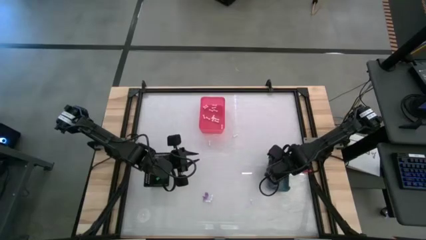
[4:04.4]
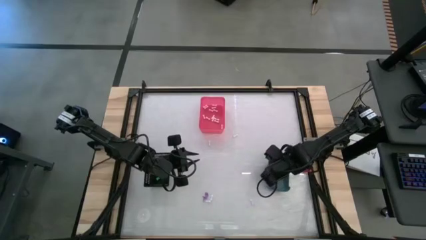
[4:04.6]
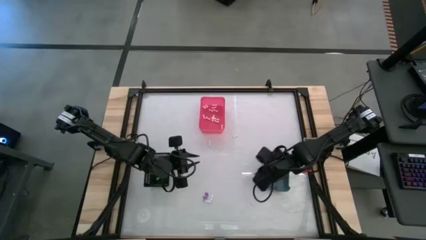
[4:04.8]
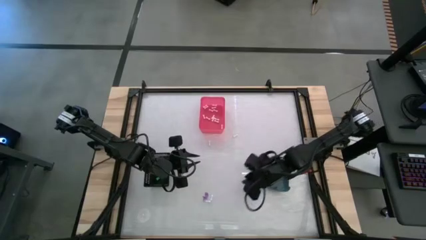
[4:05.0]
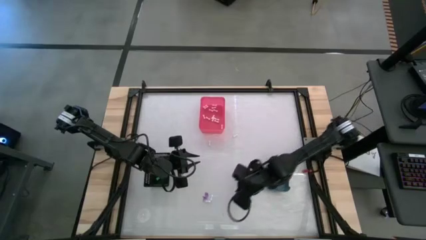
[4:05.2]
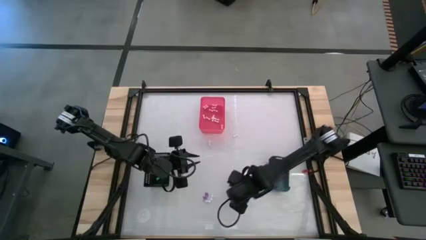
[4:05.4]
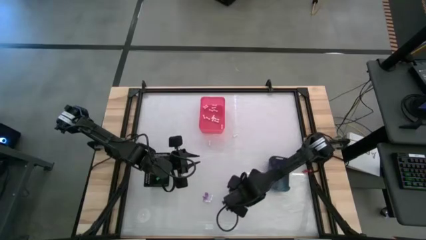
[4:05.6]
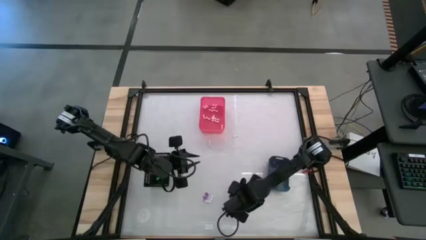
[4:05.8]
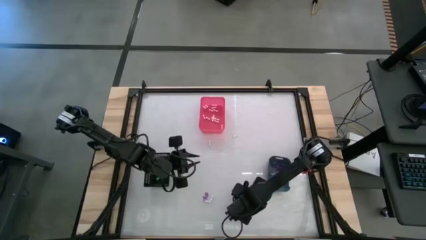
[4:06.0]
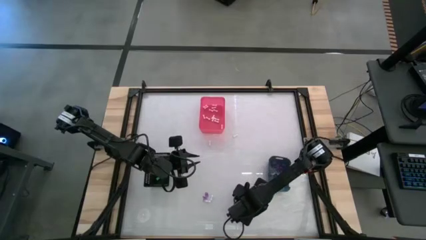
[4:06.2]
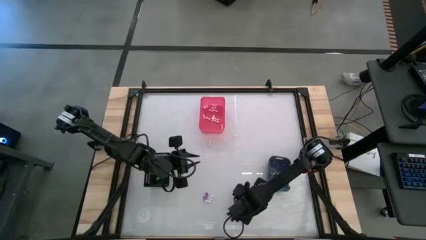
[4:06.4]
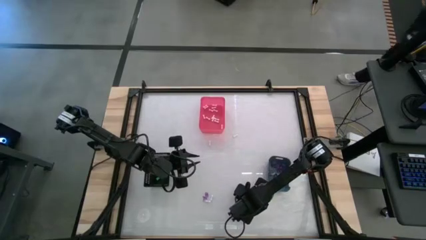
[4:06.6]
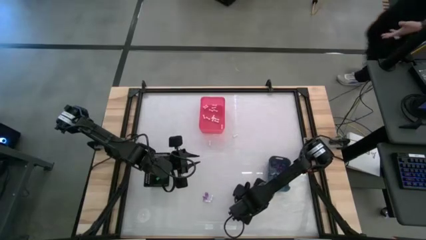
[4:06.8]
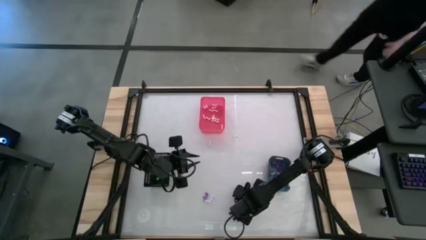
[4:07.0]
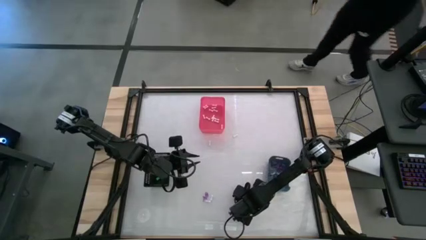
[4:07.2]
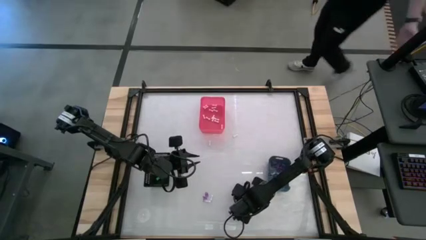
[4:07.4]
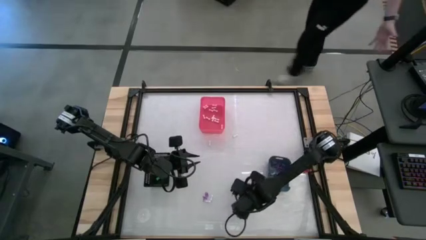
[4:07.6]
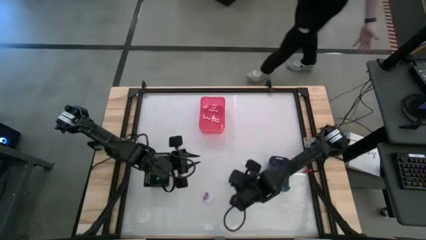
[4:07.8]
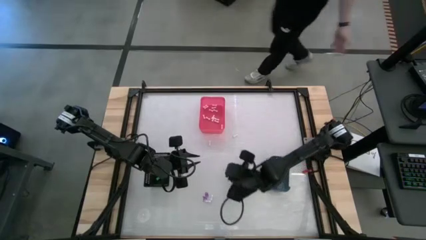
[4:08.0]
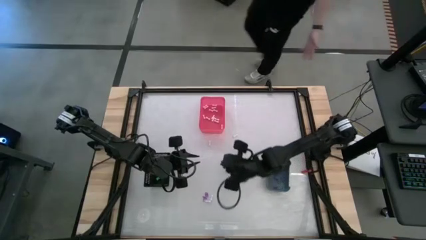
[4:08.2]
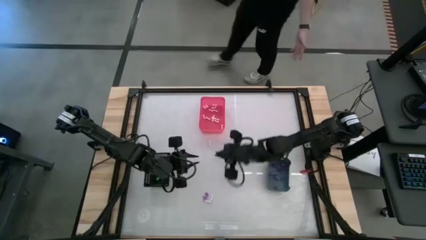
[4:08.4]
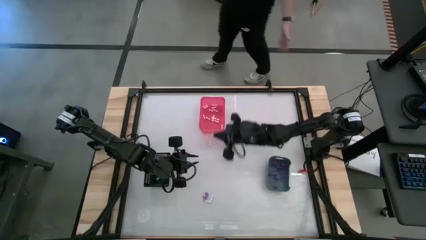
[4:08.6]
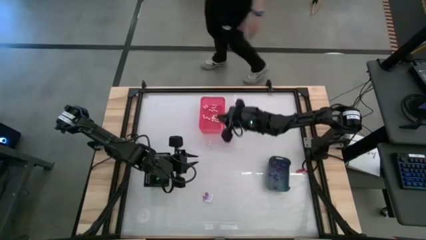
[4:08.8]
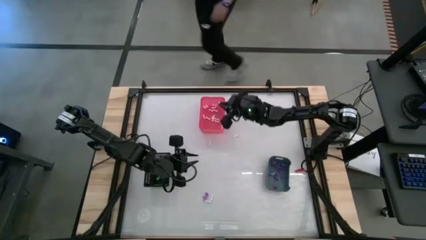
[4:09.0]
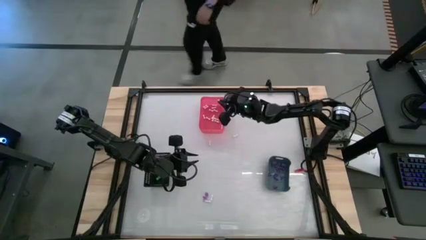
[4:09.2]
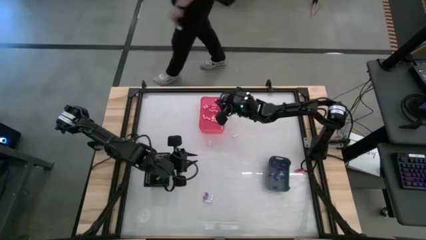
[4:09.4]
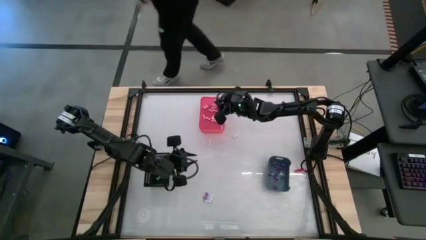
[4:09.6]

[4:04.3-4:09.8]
Task: Sort Halloween decoration
Put the bone toy into the red bin

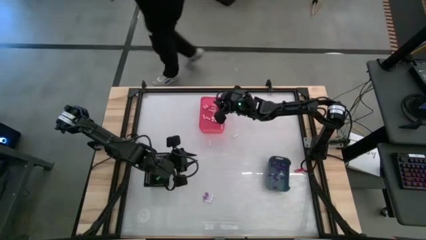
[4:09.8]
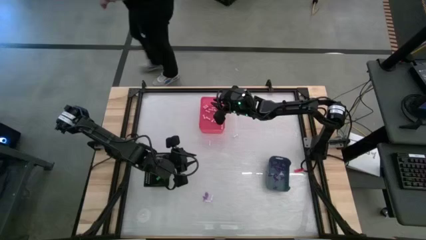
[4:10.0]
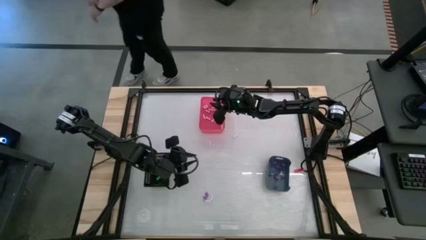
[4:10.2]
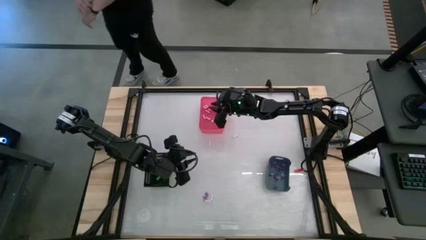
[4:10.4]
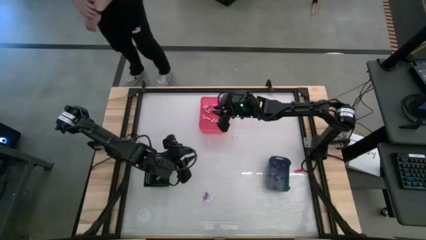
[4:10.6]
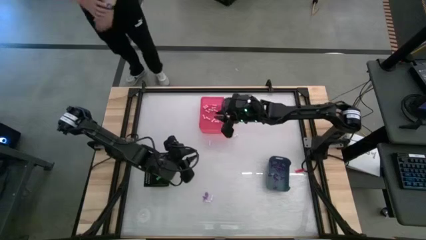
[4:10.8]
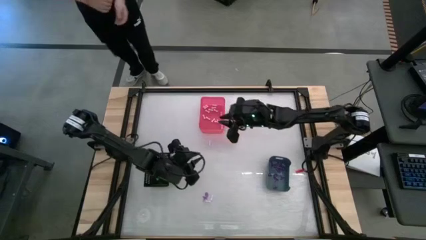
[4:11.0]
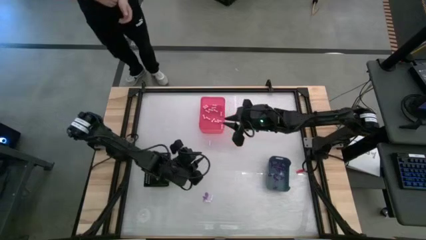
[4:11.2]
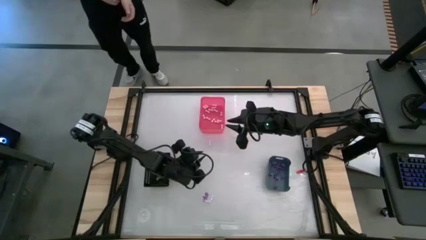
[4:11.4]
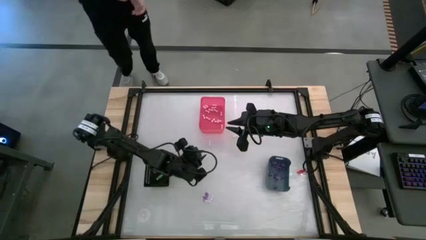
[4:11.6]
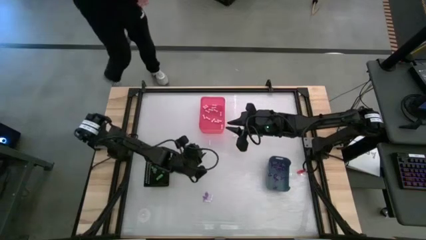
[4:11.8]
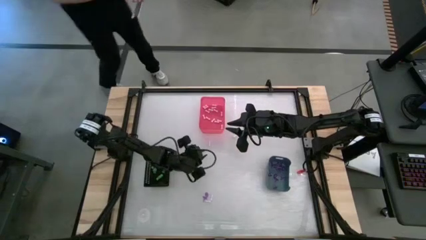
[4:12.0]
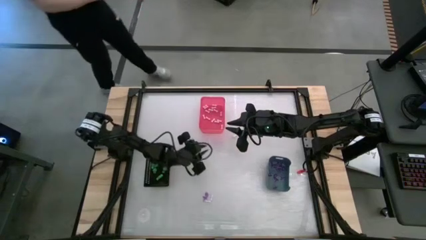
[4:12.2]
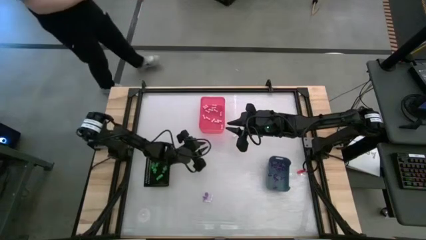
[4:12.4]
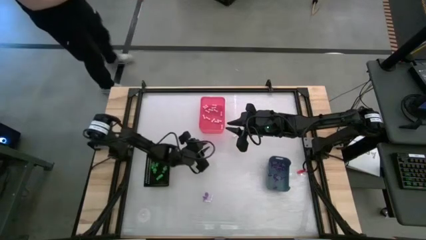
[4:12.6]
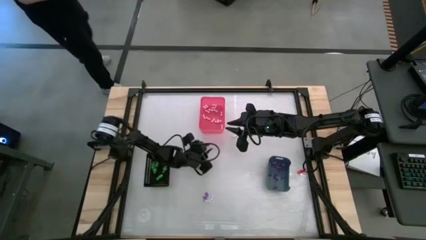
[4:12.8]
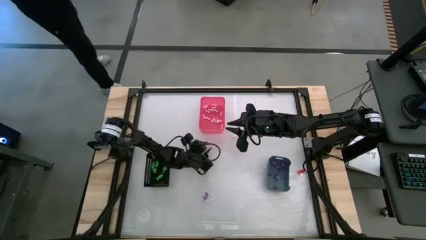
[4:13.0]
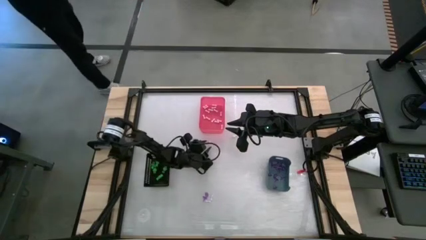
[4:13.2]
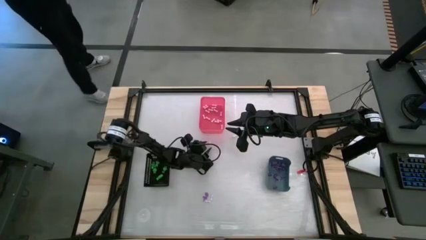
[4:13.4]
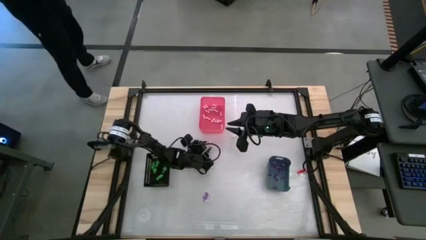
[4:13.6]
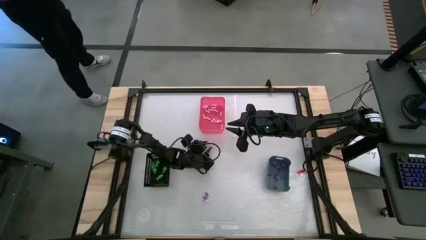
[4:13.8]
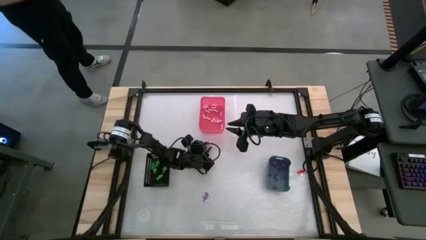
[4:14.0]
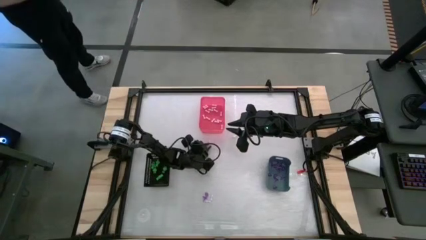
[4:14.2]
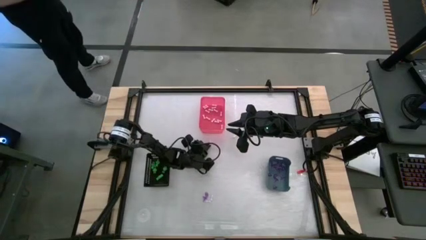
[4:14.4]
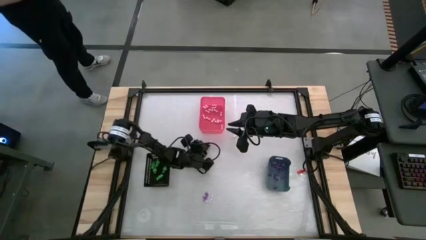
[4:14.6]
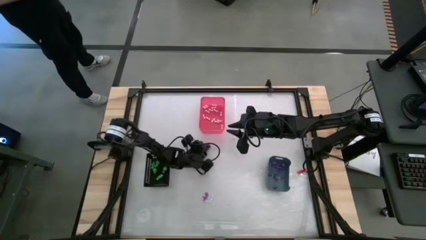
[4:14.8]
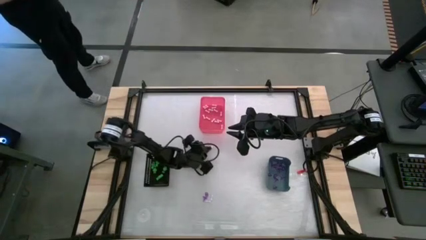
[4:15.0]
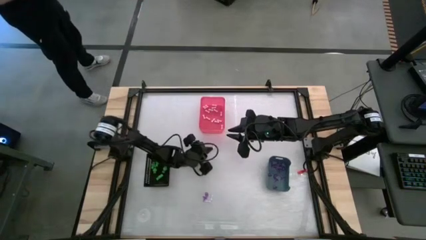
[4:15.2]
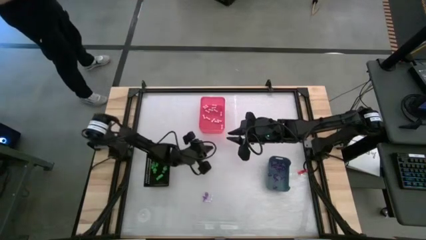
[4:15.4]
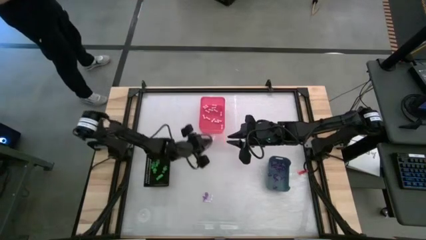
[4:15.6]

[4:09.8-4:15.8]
Put the bone toy into the red bin

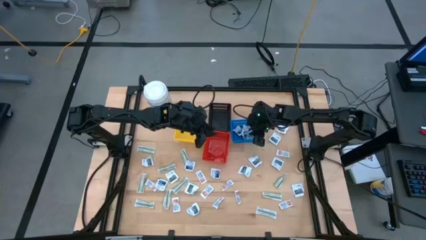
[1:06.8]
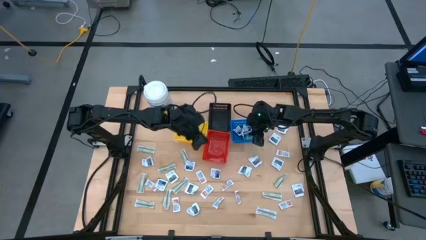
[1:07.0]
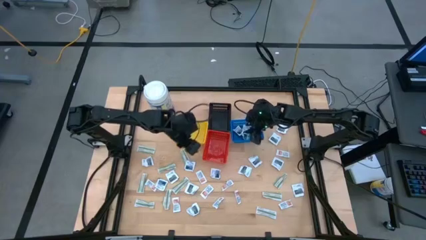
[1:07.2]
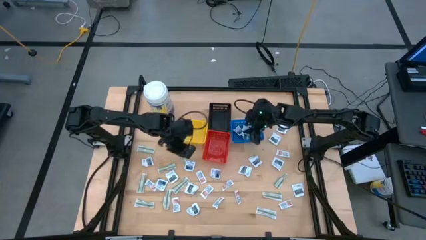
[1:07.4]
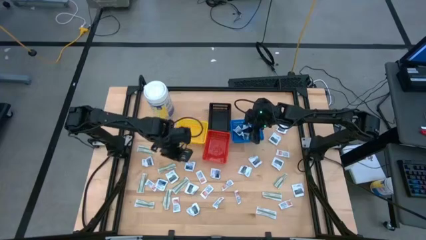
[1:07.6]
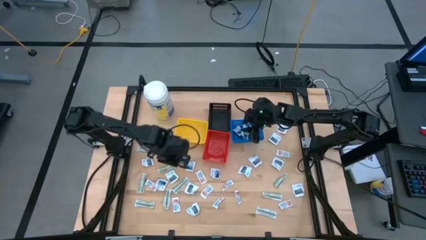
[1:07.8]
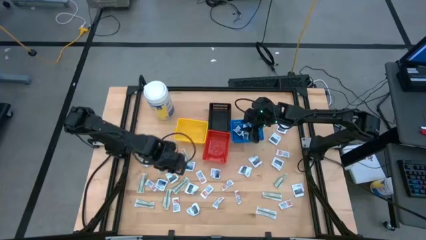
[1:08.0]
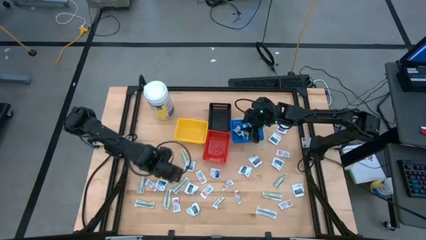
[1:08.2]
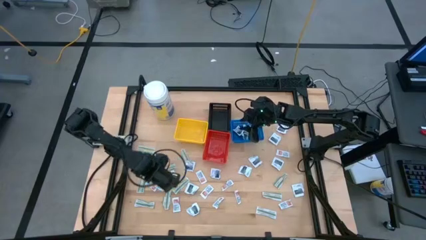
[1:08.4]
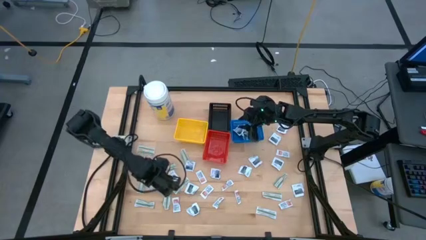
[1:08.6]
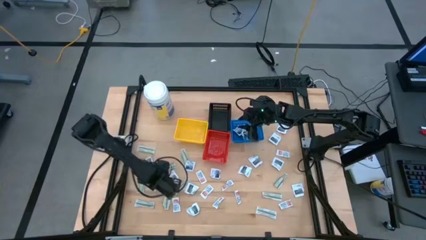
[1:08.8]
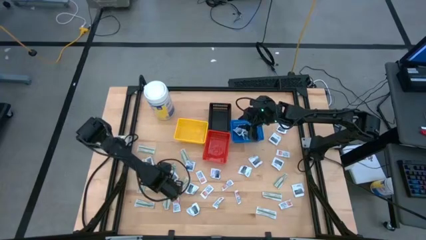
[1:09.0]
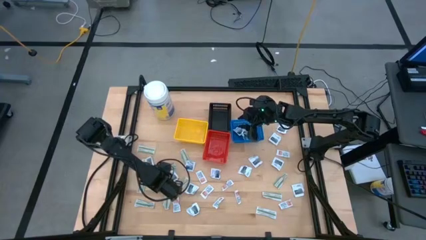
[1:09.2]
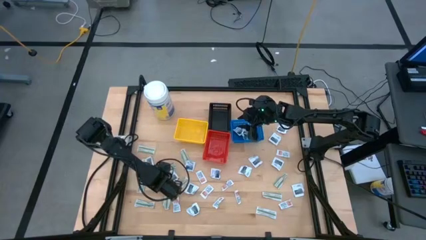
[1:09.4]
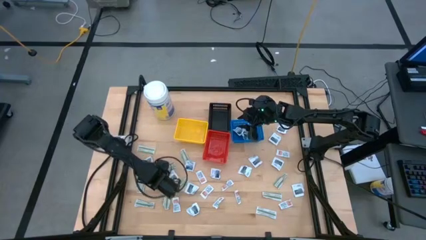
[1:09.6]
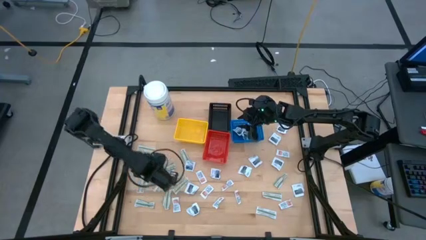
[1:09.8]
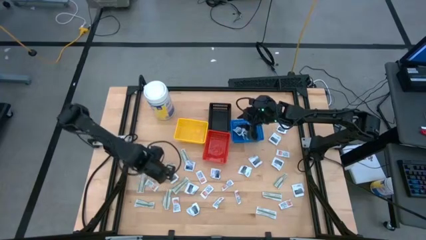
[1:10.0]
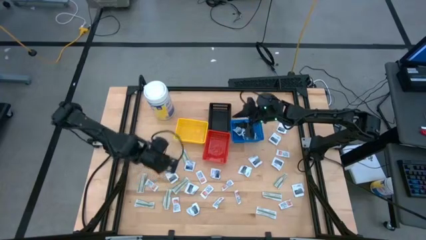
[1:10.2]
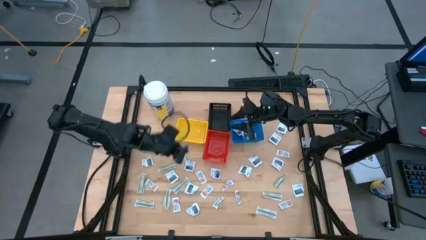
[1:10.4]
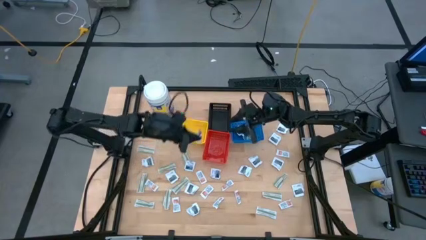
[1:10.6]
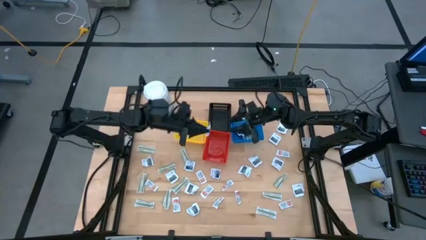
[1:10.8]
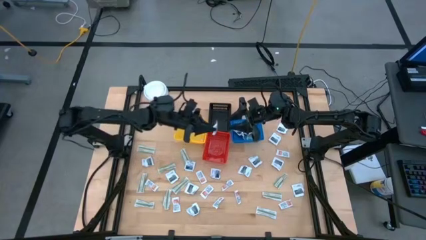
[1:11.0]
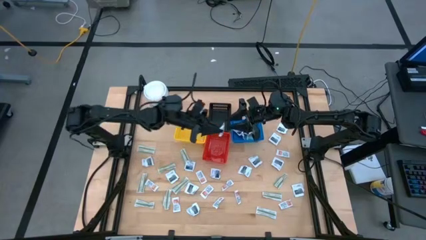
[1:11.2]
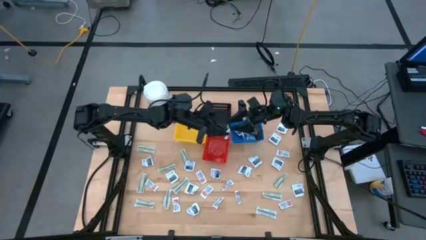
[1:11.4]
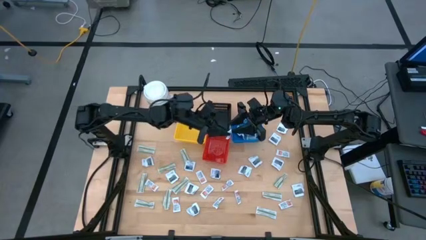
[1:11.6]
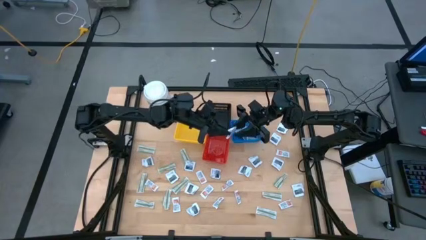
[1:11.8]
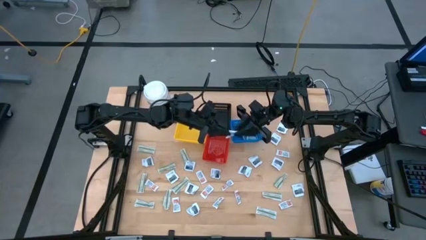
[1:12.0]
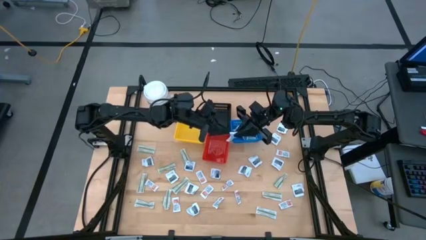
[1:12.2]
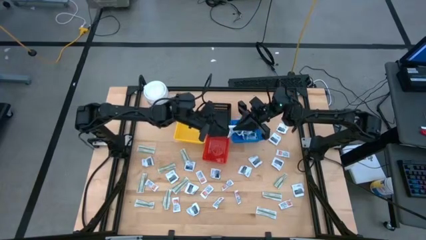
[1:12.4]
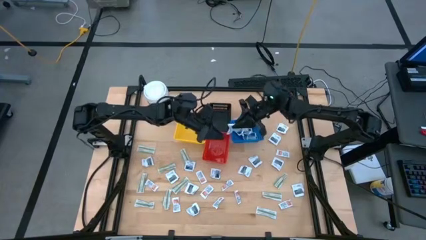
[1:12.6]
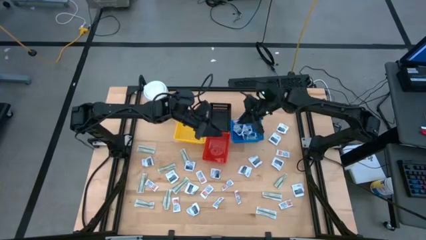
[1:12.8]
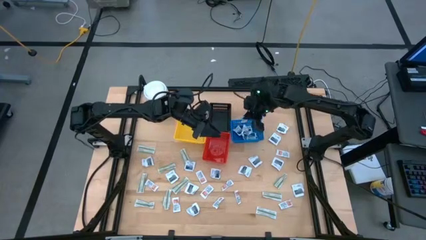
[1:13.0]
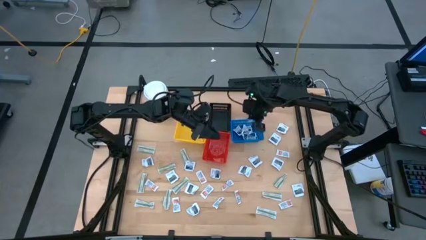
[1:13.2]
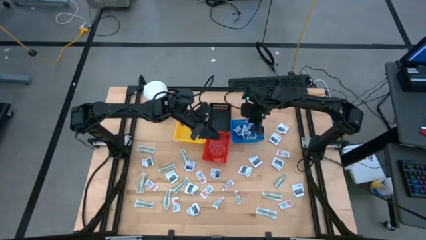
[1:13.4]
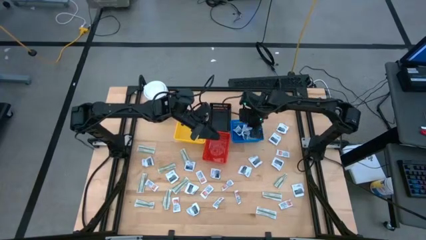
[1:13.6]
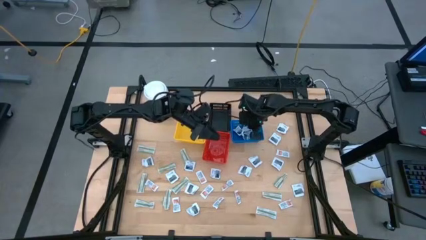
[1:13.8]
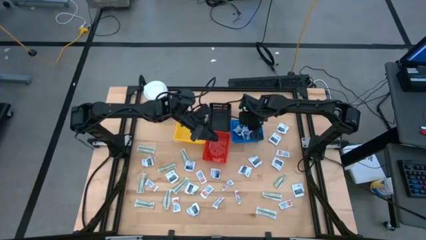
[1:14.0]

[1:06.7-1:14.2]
Task: Pick & Place First Aid Supplies
Put the alcohol pad into the blue bin
